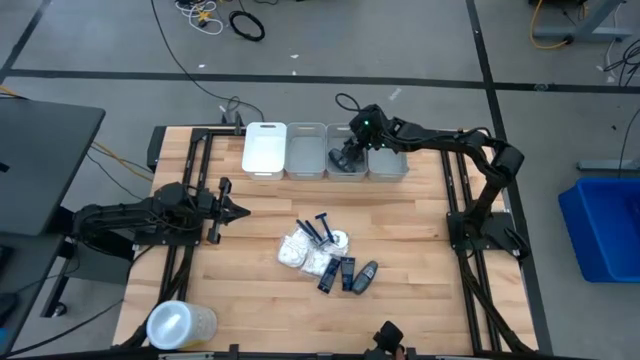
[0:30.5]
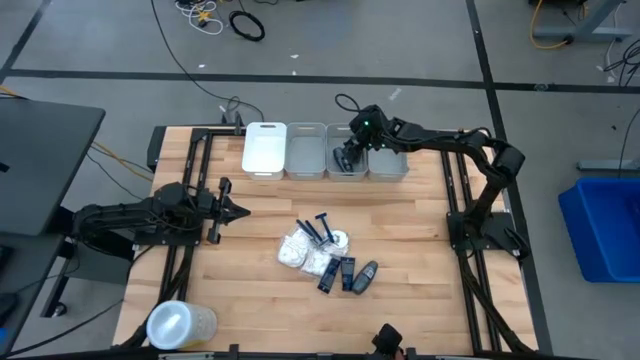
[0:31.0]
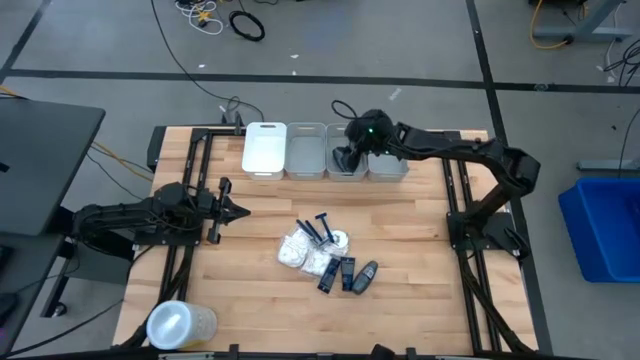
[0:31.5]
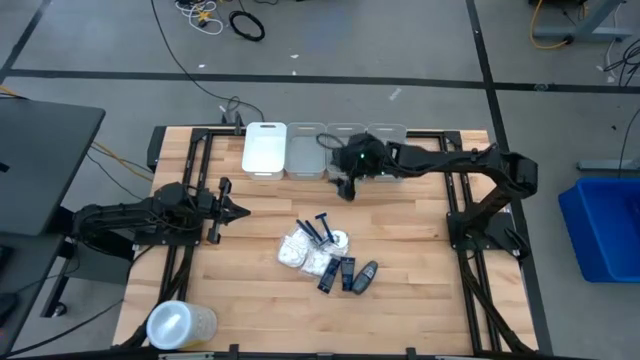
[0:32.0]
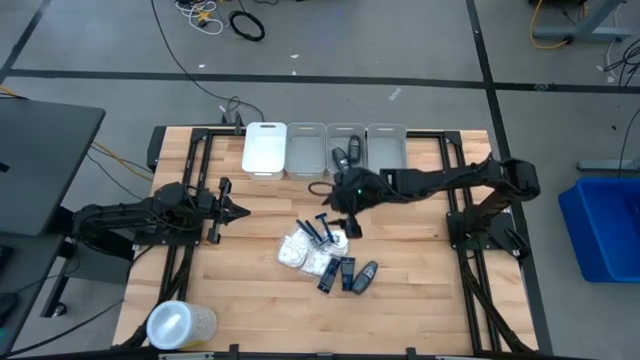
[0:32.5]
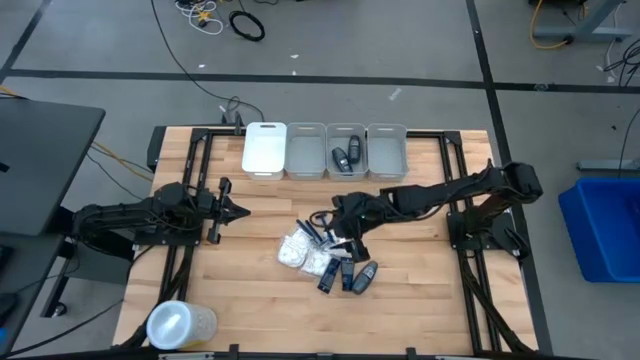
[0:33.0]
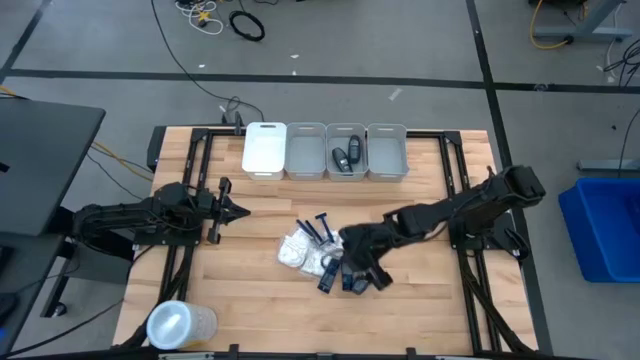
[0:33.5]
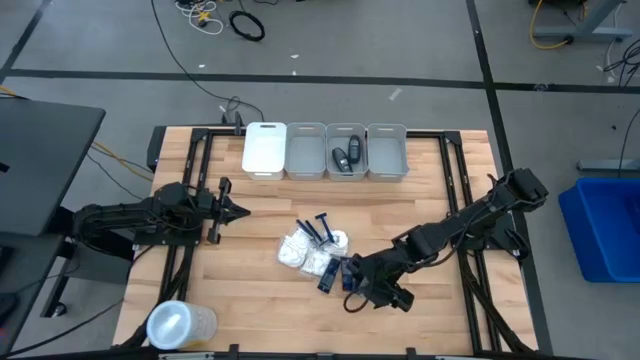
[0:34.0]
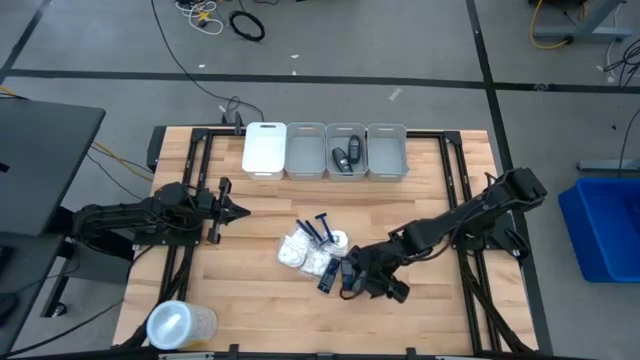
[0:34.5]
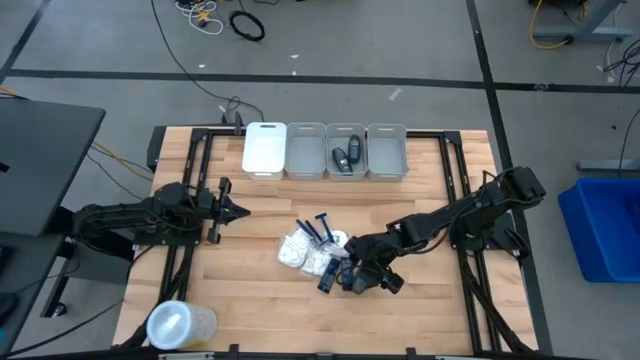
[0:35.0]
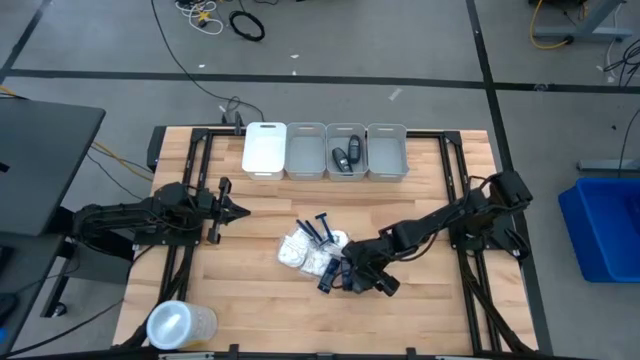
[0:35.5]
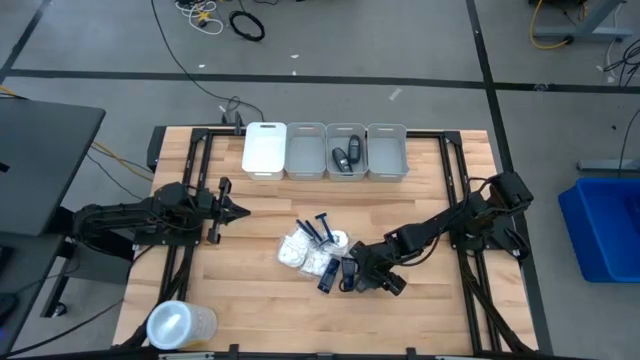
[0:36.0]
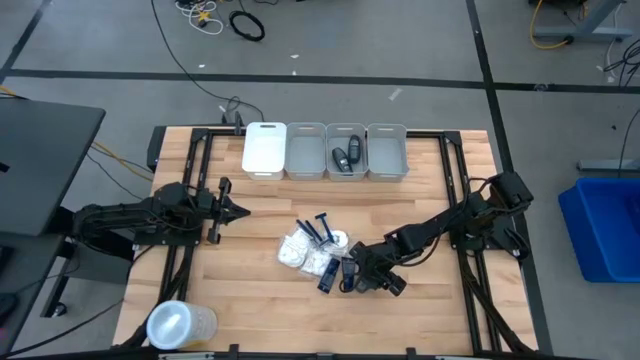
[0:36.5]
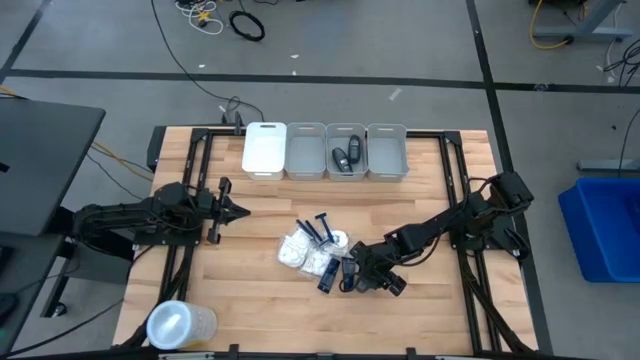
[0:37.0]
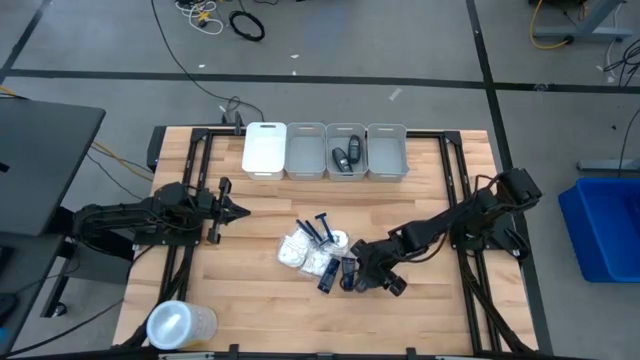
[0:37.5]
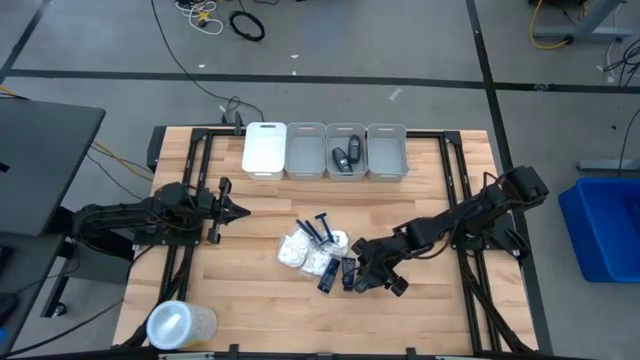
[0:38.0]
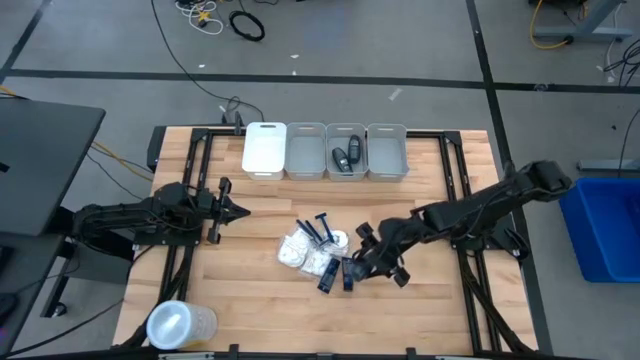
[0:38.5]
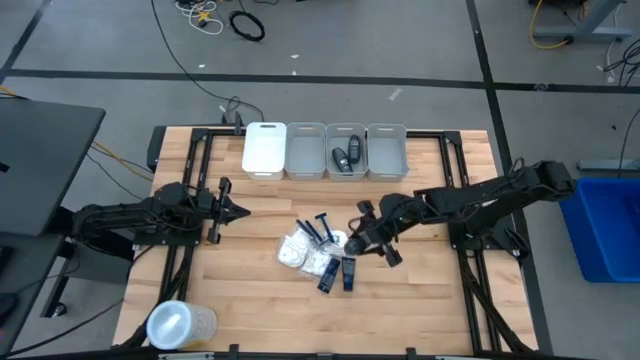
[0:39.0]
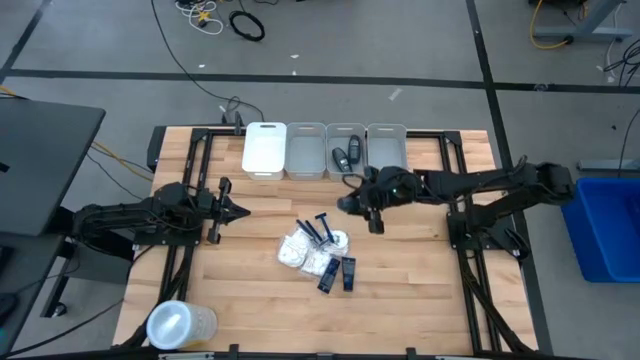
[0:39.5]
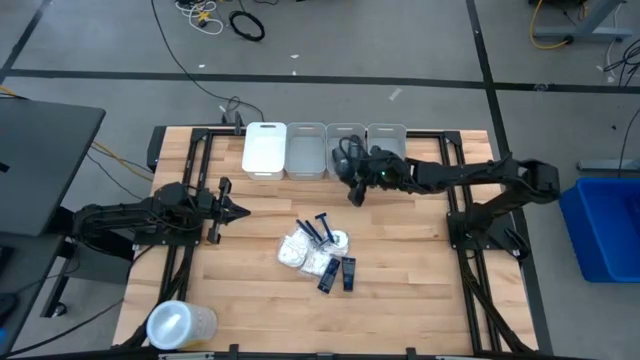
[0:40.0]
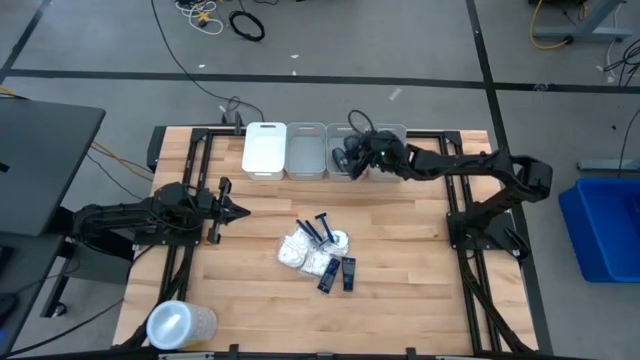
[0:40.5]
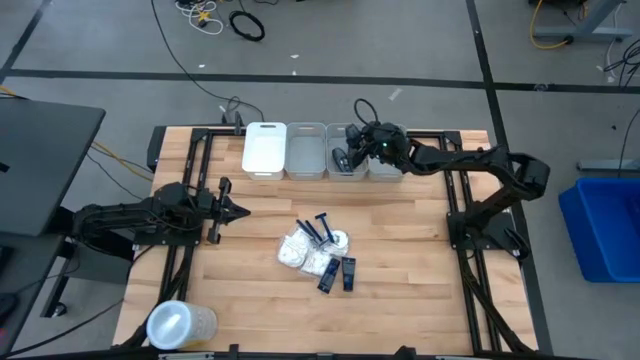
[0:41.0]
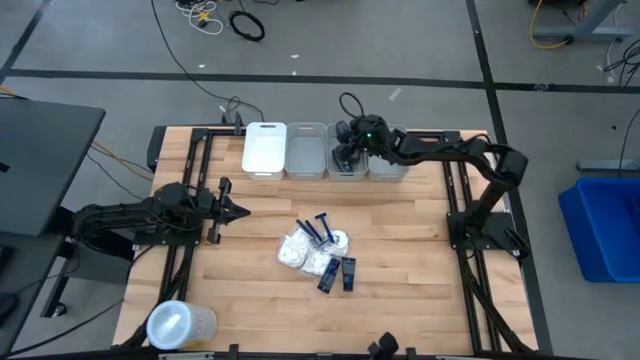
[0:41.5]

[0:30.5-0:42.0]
Task: Pick & Place Travel size toiletries
Put the gray deodorant into the middle gray bin

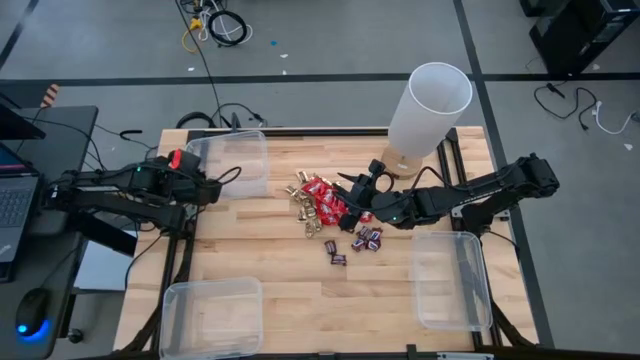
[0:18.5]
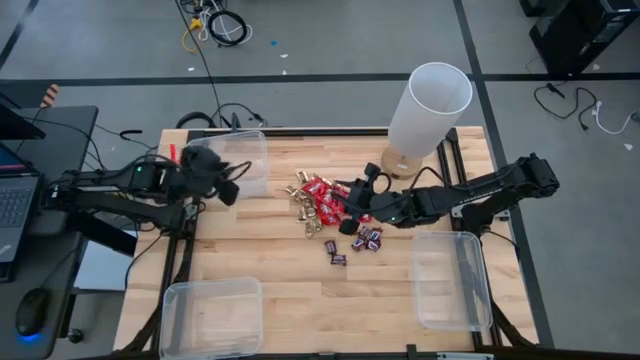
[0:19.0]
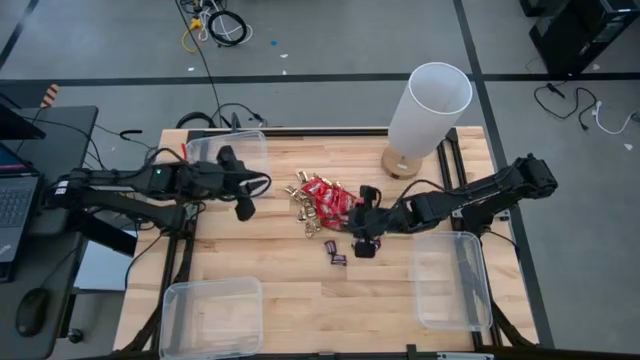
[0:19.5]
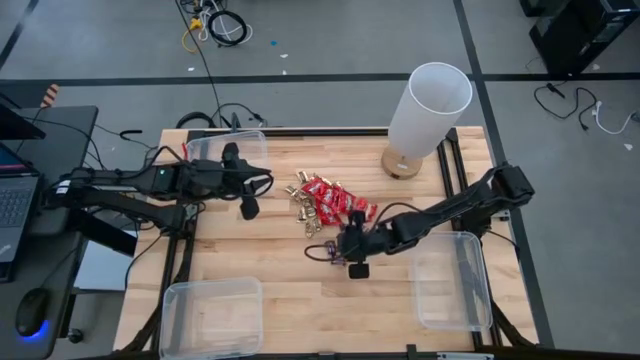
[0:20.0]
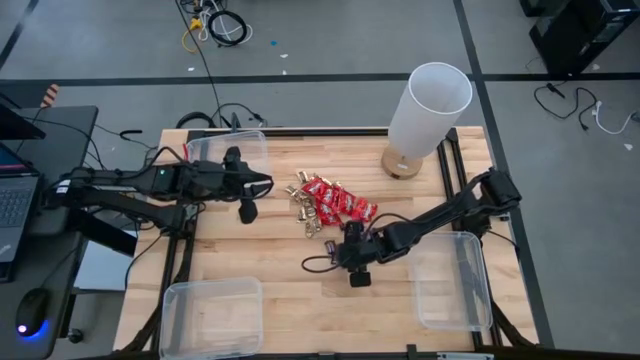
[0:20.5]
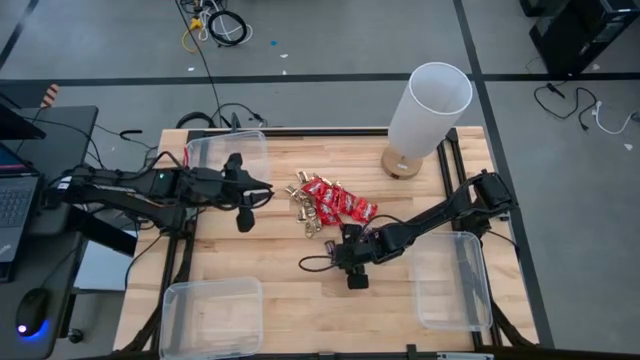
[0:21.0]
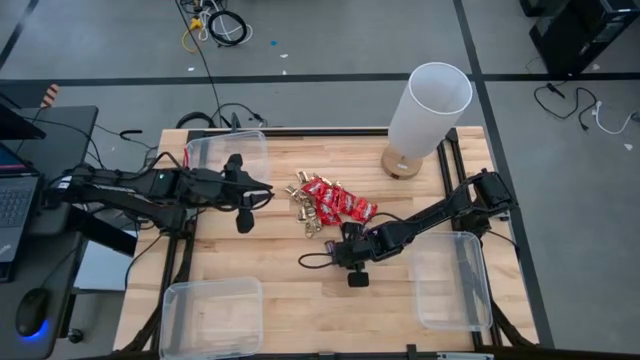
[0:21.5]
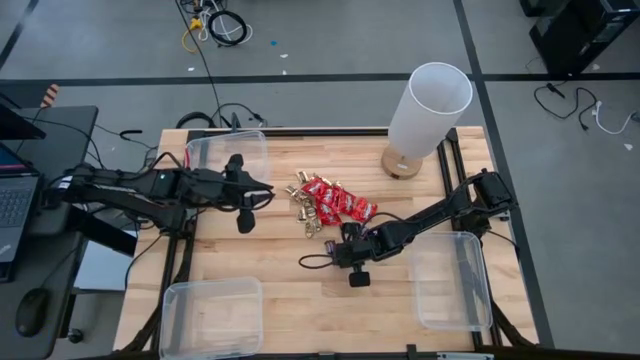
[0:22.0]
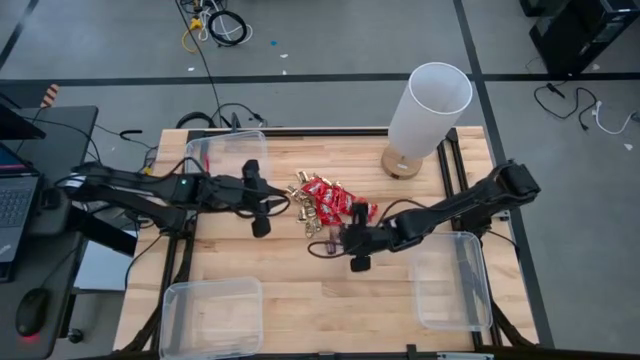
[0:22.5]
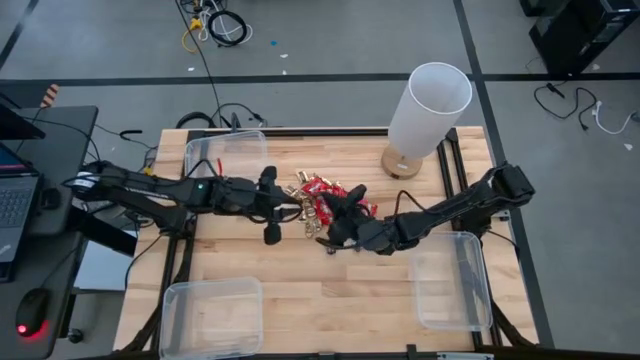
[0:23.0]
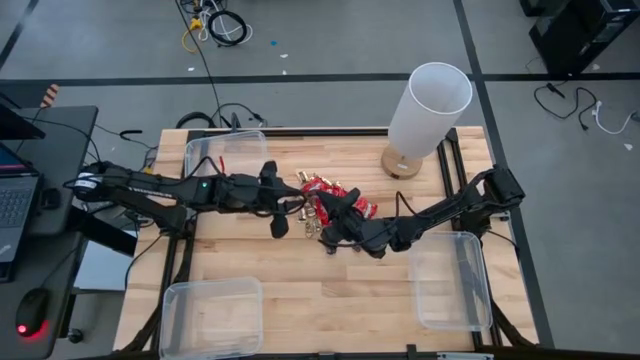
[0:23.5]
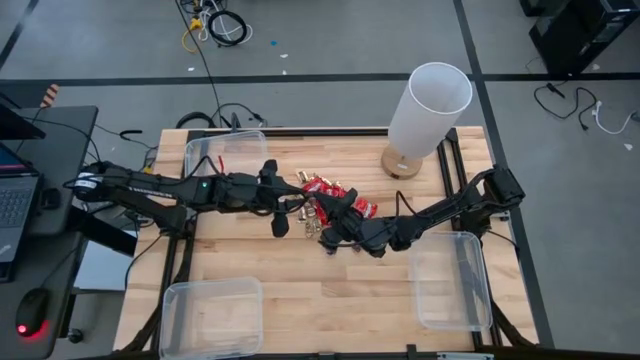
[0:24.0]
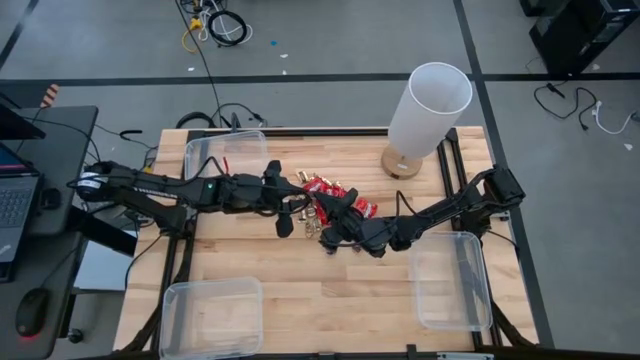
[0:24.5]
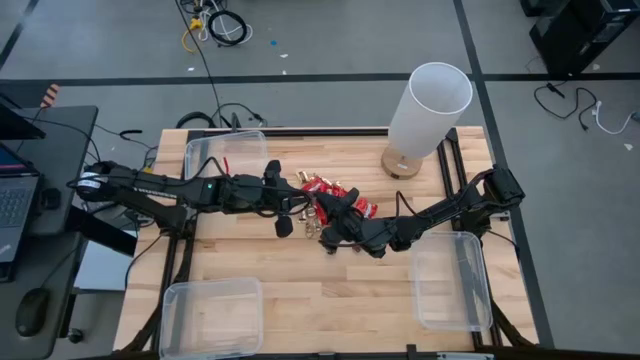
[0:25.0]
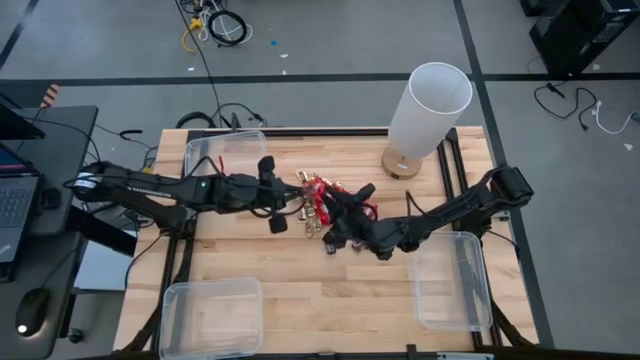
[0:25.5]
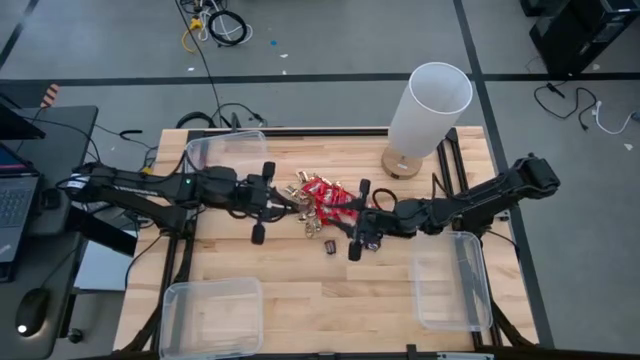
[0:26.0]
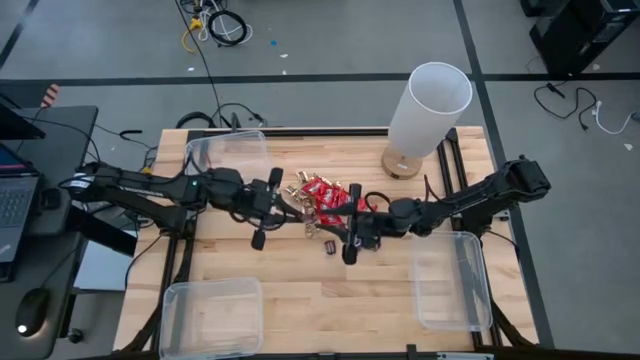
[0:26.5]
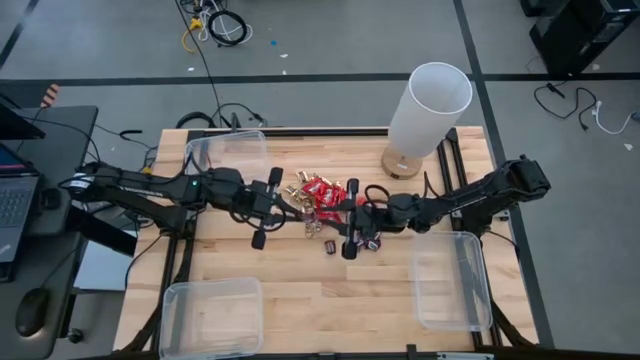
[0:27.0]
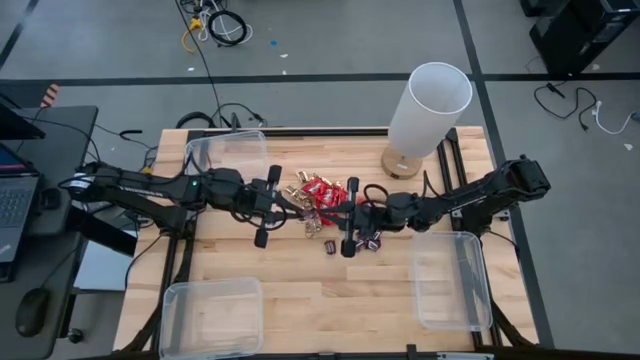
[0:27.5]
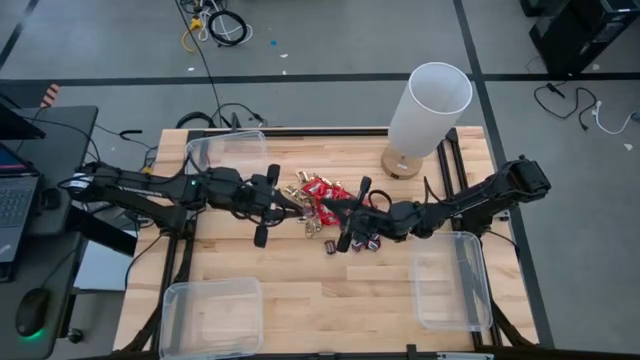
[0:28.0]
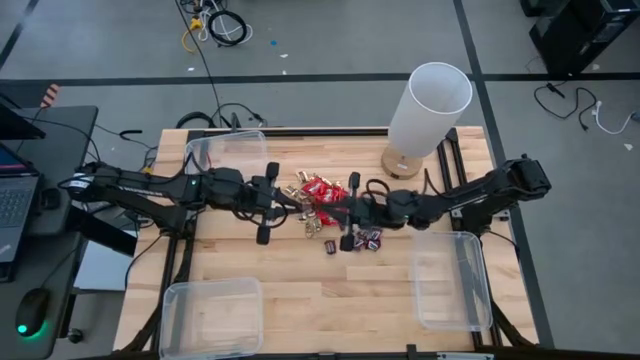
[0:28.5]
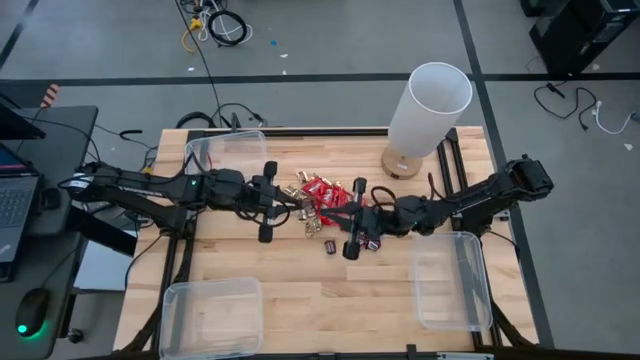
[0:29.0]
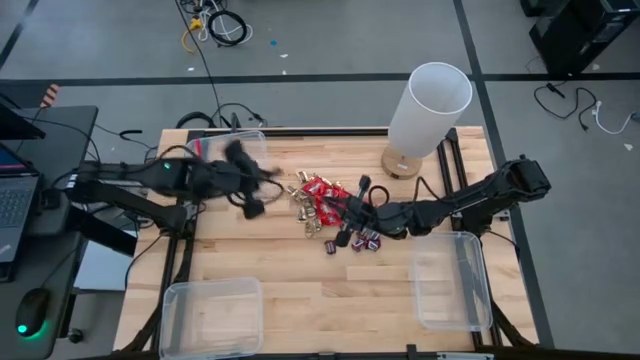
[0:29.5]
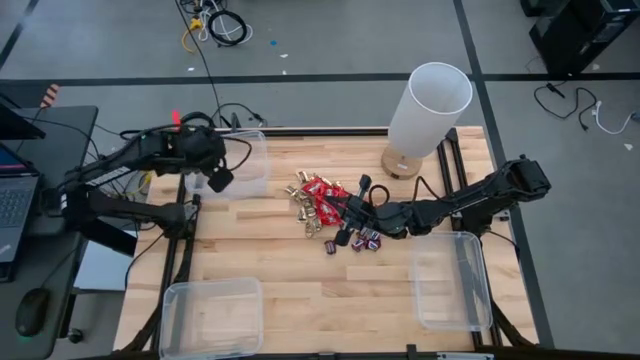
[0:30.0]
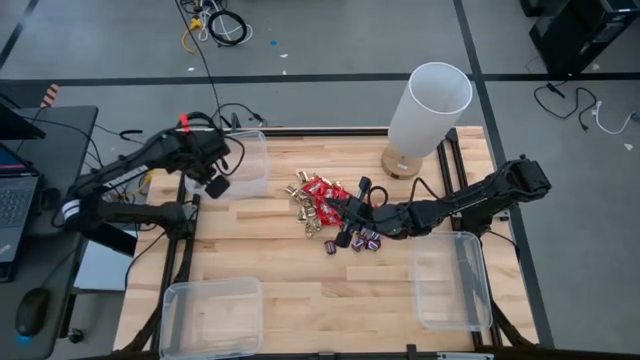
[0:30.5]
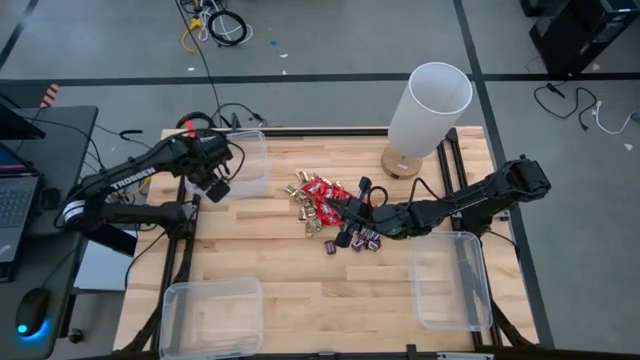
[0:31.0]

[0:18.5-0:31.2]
Task: Sort candy
Put the brown chocolate into the top left transparent bin
